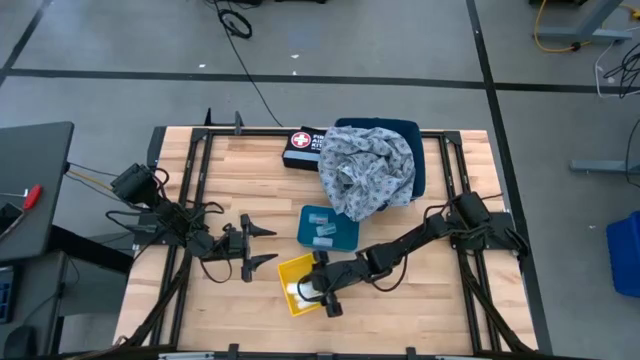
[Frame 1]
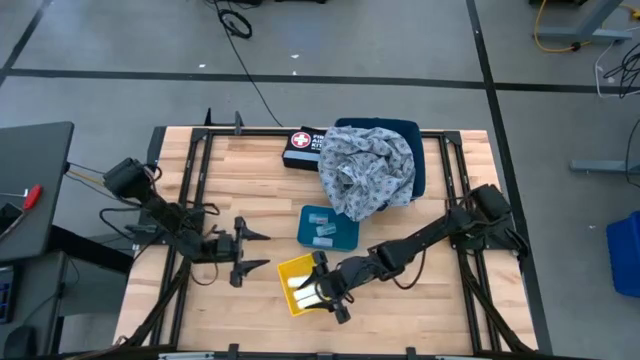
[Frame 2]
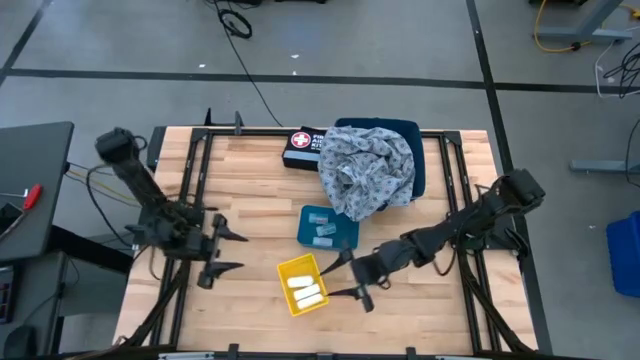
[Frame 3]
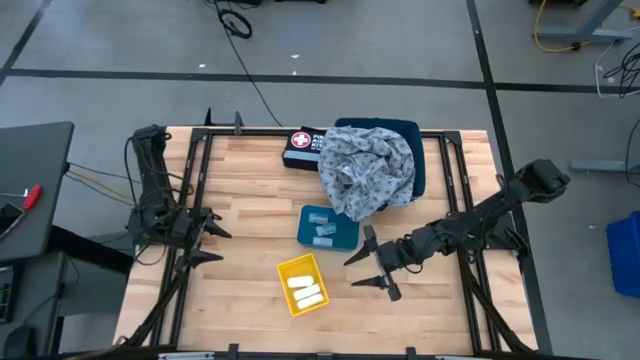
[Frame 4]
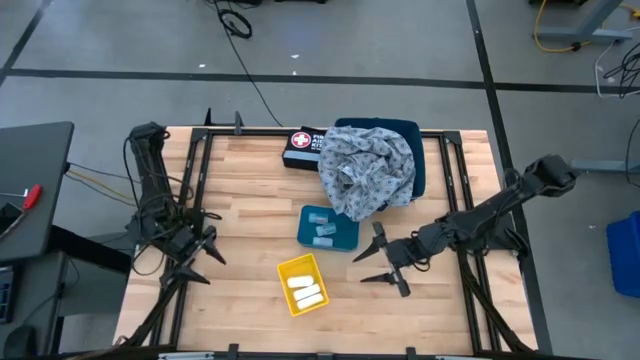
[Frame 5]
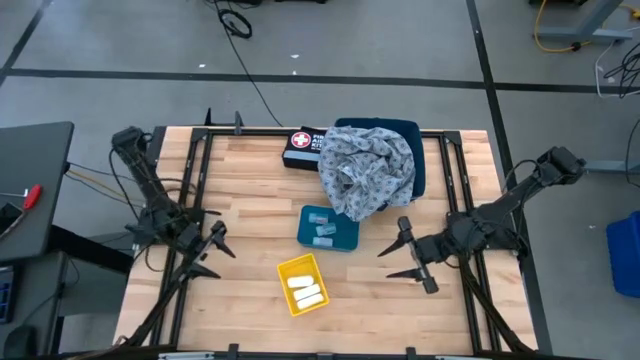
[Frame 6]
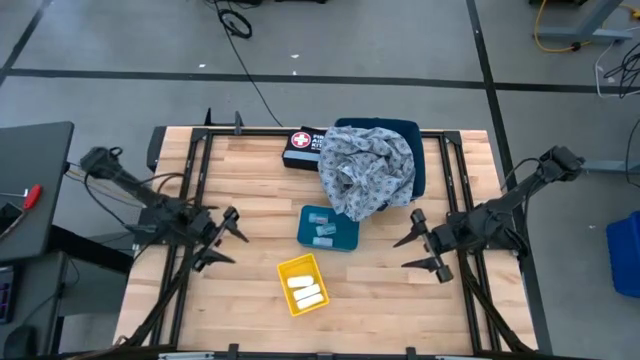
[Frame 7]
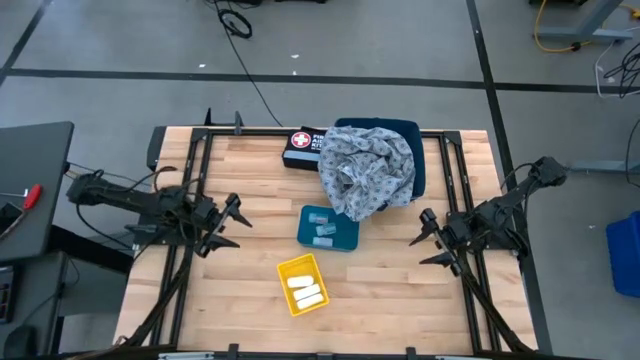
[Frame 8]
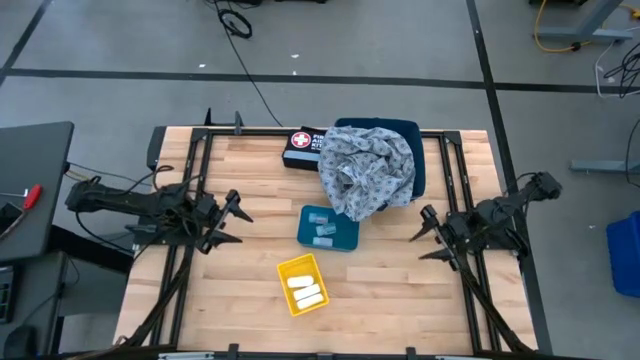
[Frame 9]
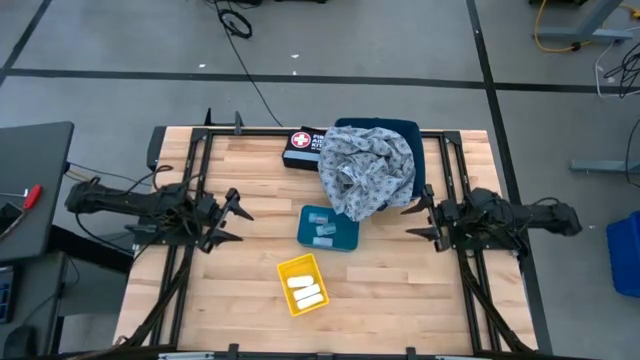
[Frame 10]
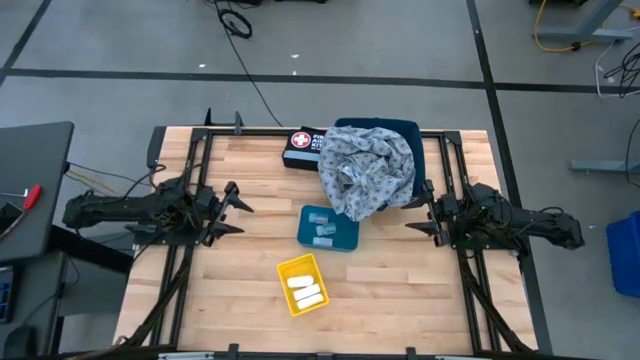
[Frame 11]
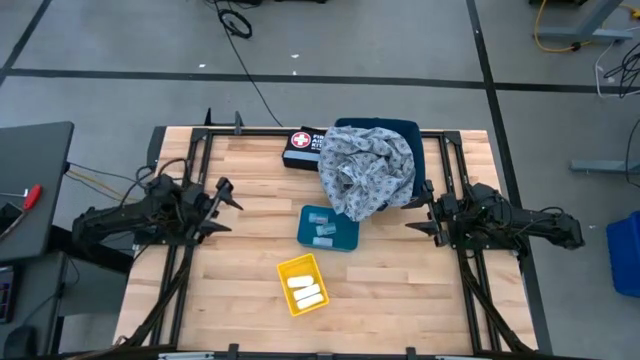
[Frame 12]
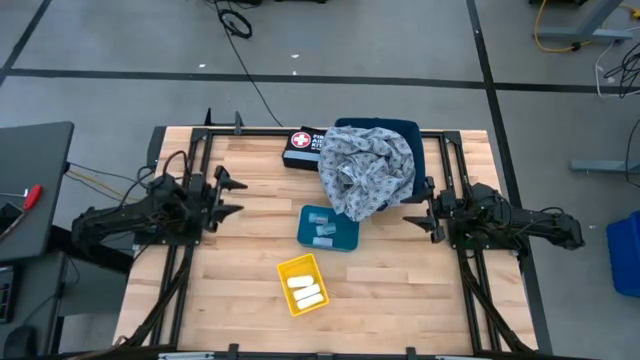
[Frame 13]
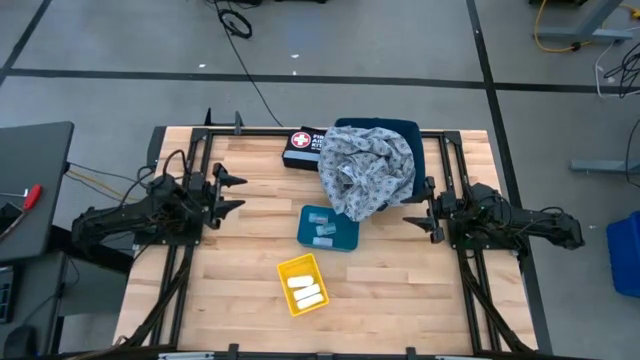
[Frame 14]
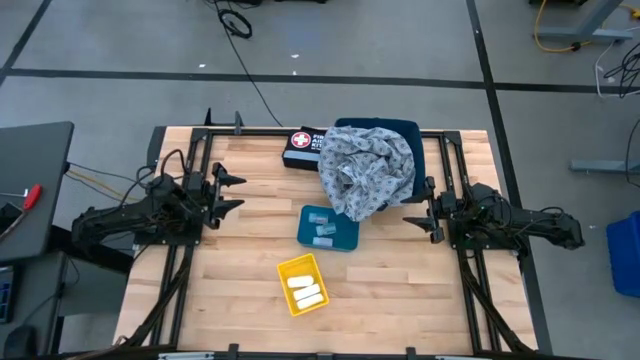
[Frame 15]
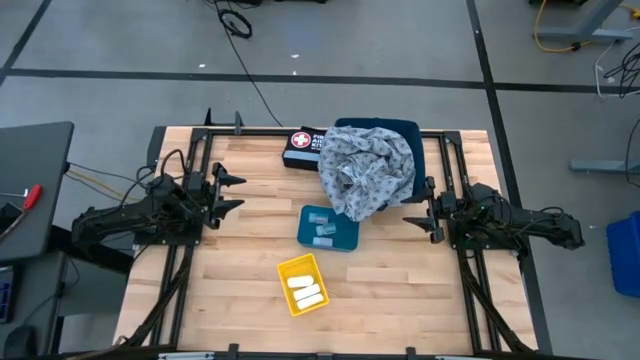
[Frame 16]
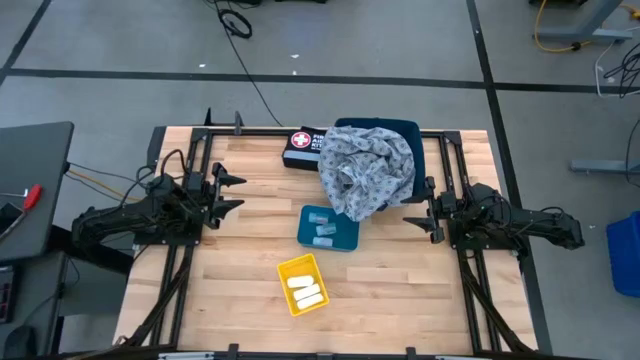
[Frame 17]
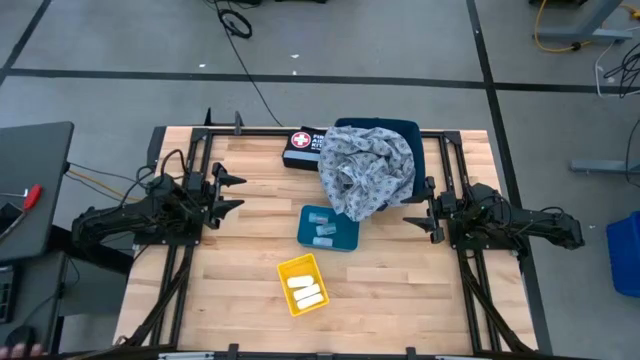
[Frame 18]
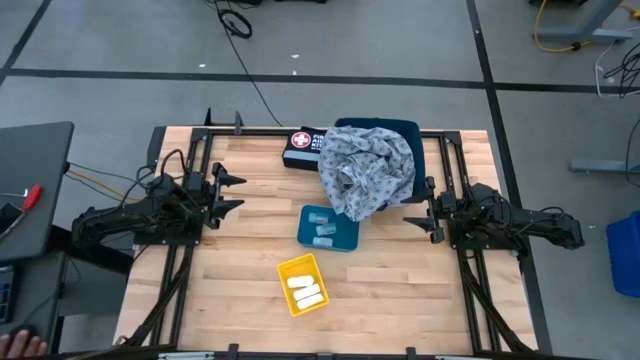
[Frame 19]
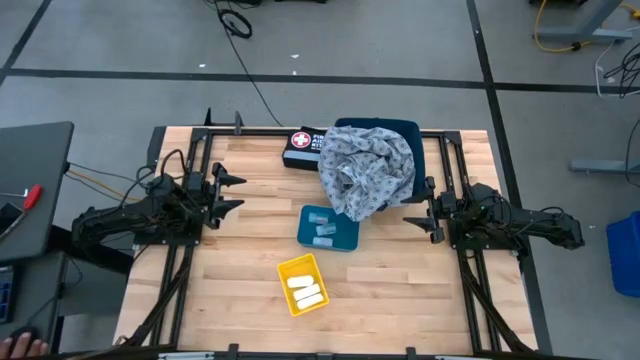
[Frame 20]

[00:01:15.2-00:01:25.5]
Task: Pick & place medical supplies in basket/bin
Return to Home Position

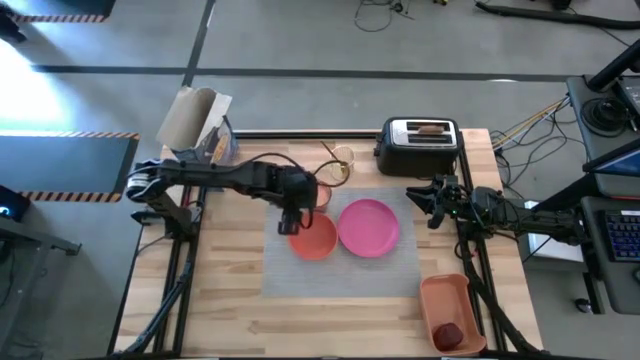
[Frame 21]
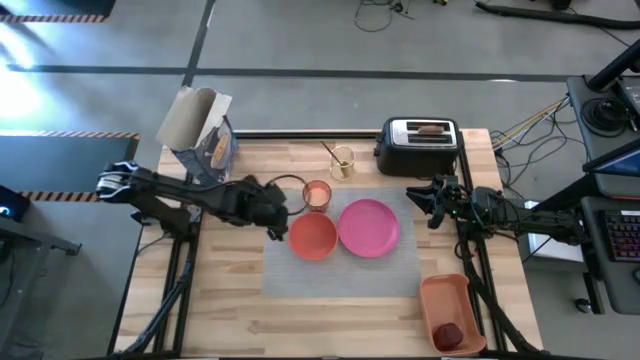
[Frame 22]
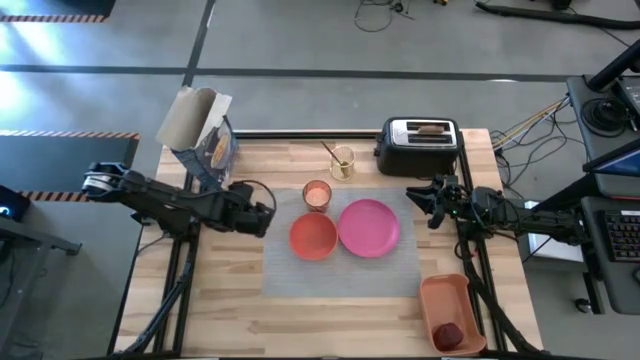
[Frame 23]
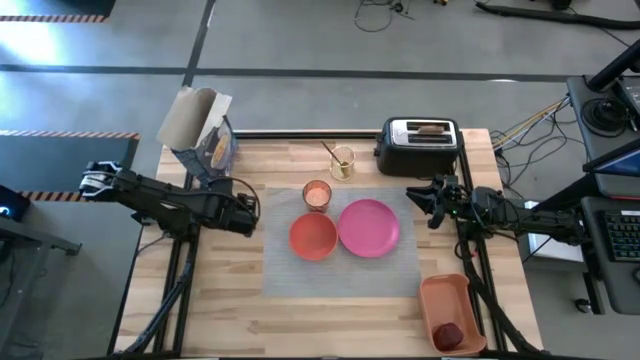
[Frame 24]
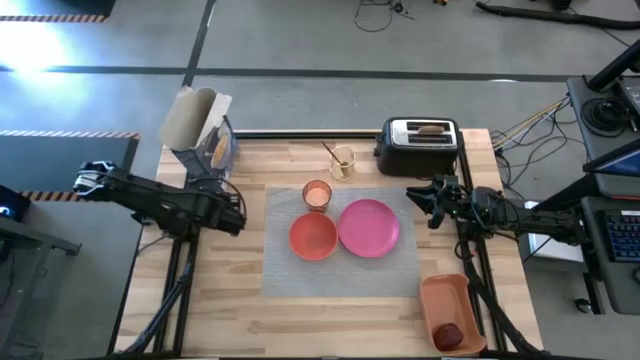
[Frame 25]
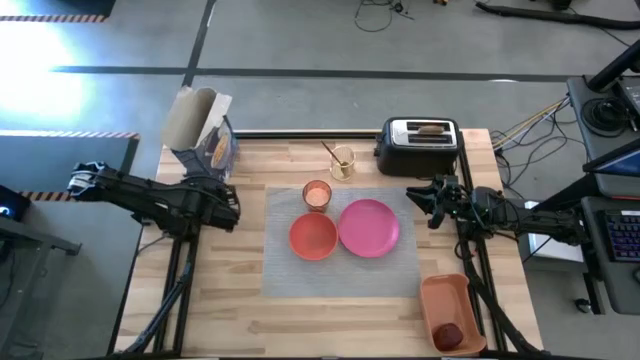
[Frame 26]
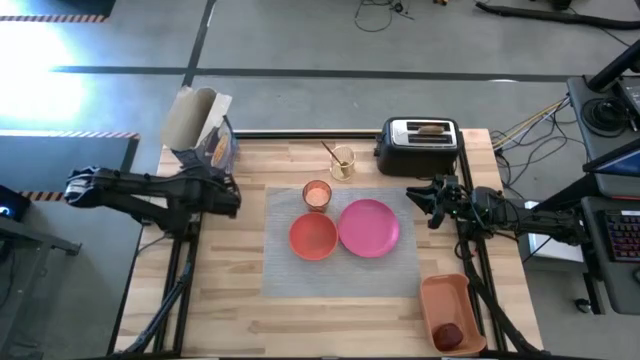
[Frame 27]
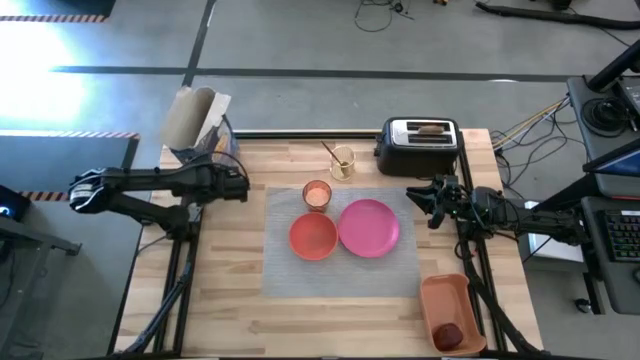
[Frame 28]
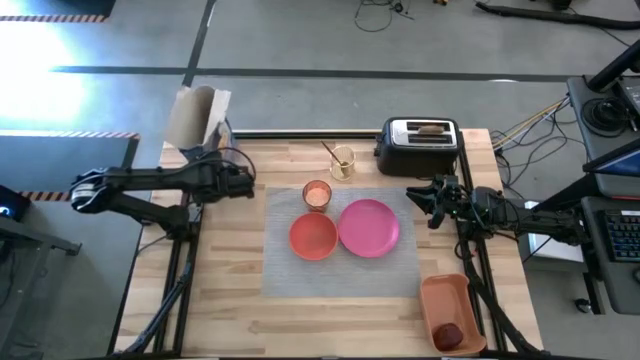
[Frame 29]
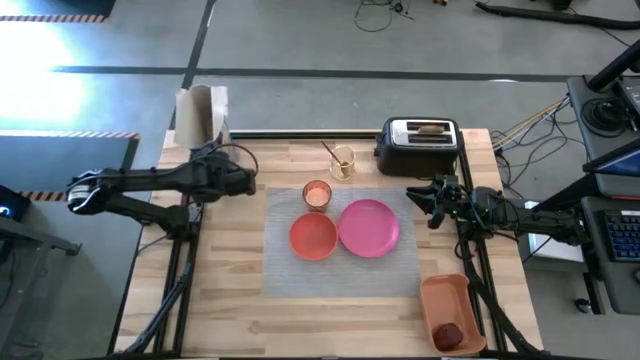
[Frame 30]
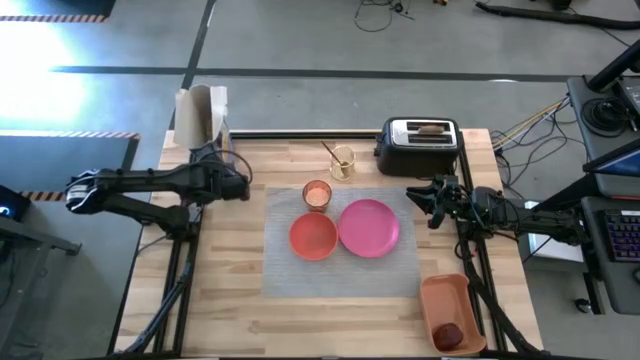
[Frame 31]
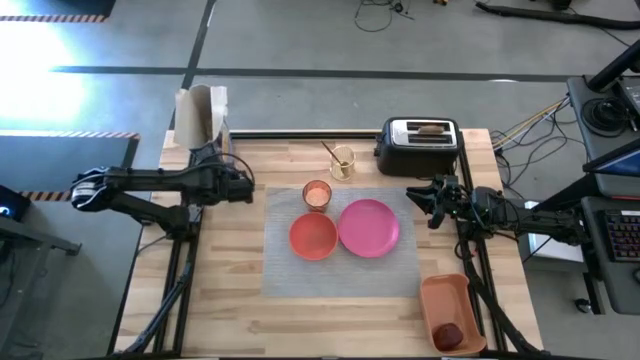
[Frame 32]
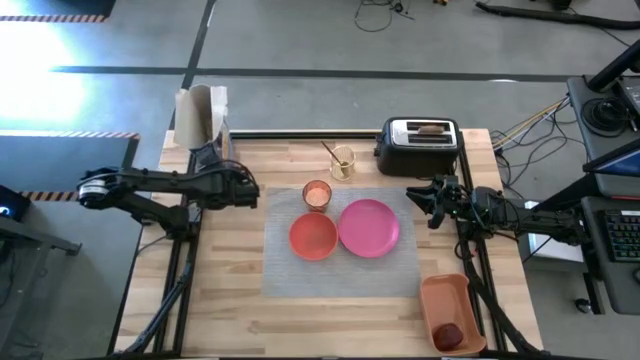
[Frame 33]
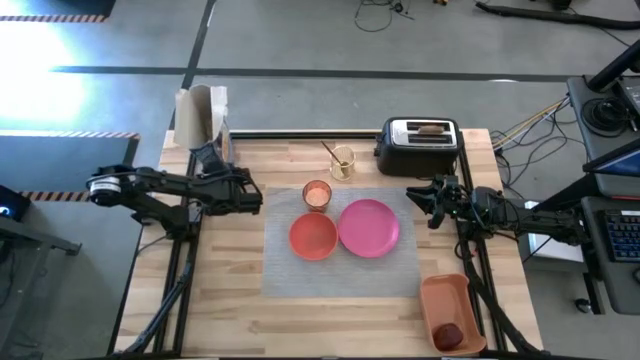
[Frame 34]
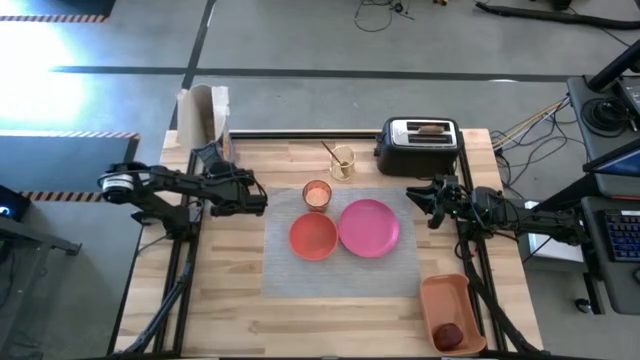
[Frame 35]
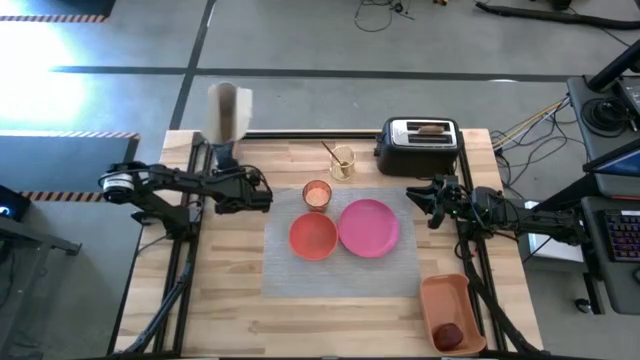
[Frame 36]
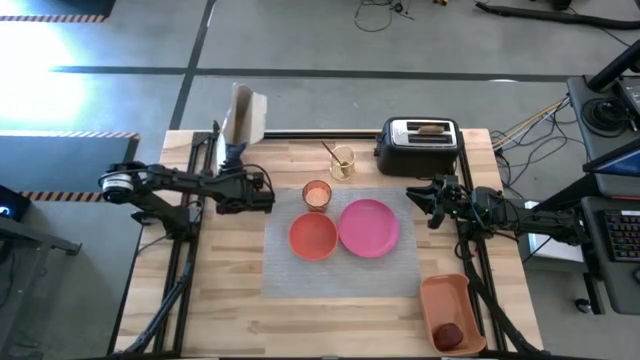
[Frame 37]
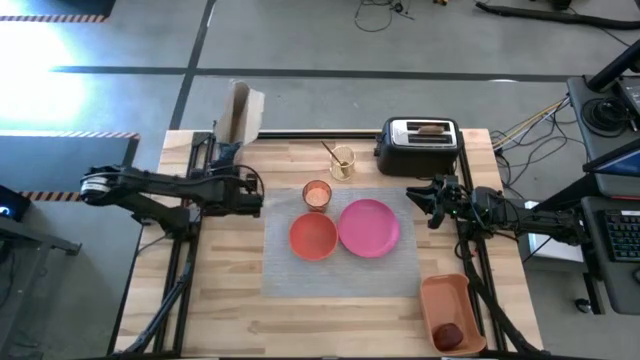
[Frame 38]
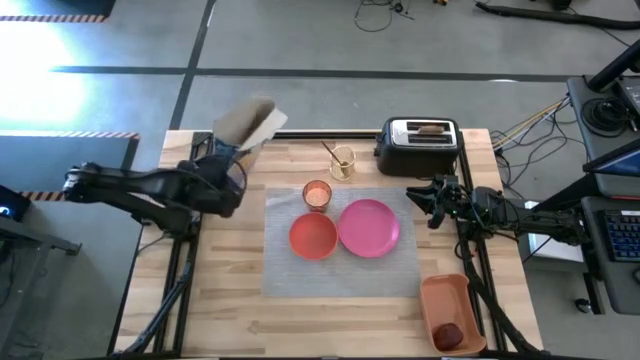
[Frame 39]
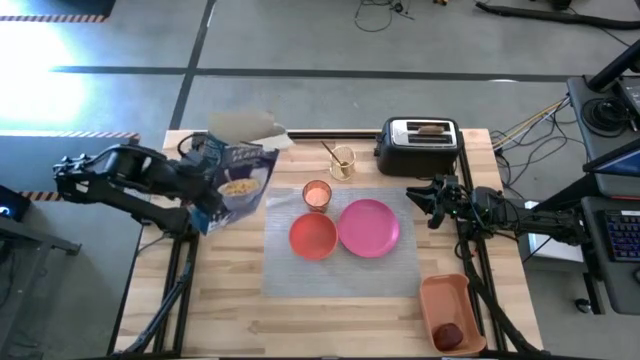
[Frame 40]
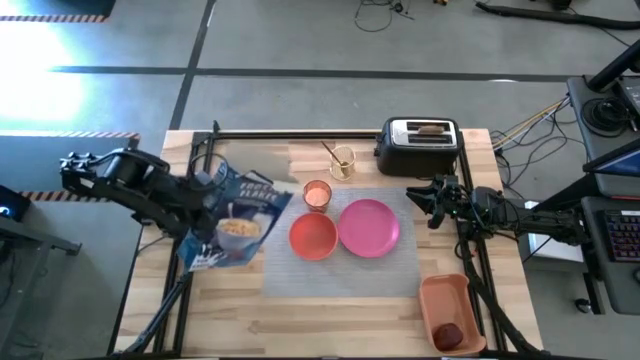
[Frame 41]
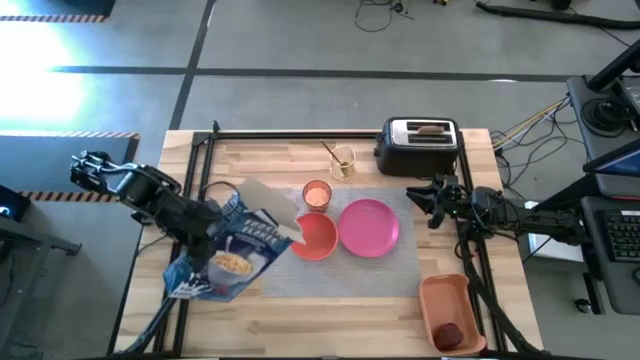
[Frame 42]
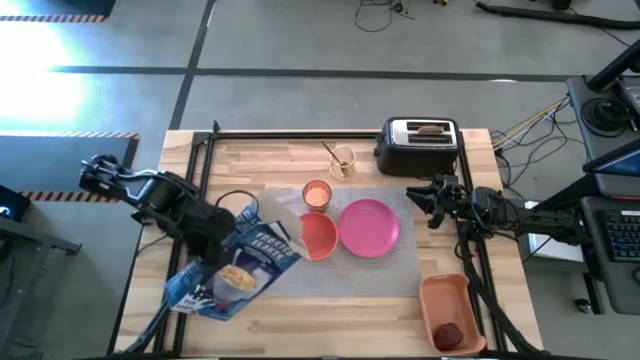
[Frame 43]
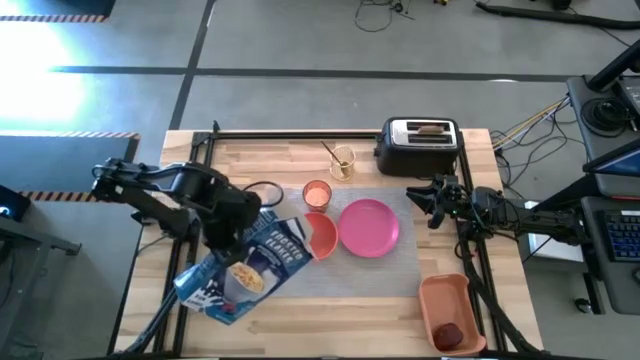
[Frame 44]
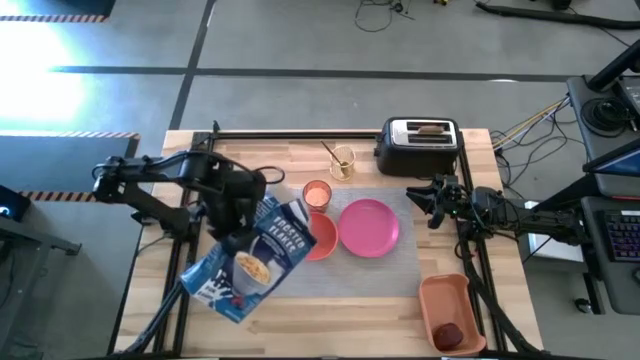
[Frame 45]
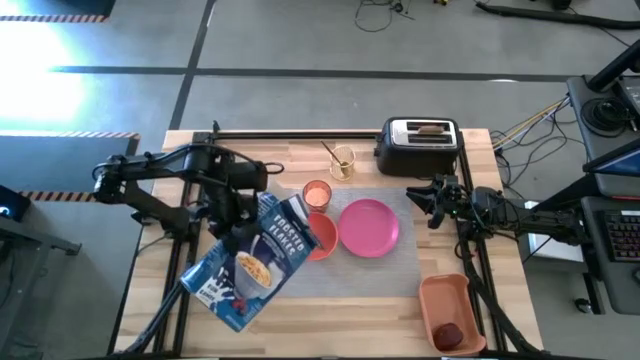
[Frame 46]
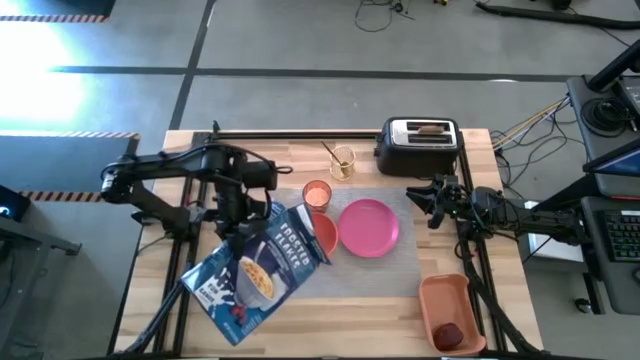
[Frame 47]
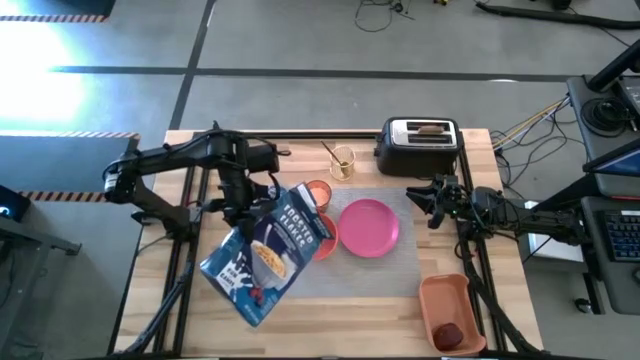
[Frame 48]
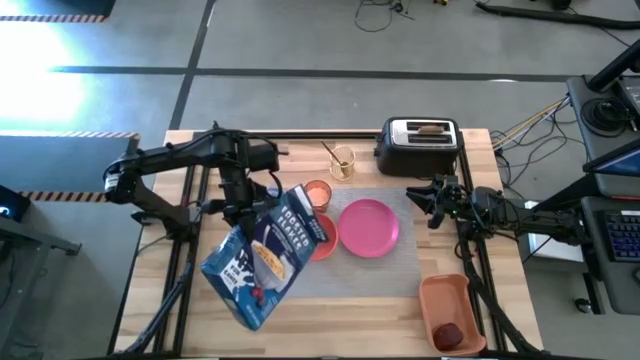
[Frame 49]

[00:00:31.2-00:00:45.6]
Task: Arrange a breakfast setting
Pour the cereal from the blue cereal box into the orange bowl on the gray tablemat
